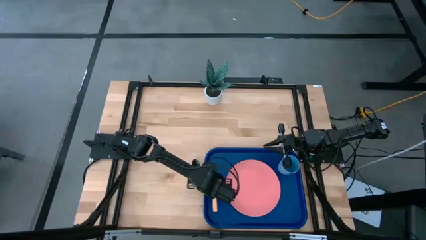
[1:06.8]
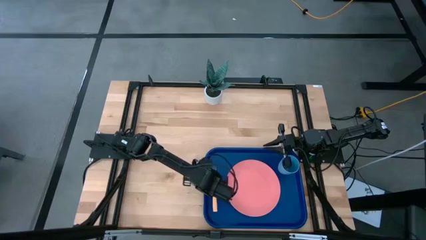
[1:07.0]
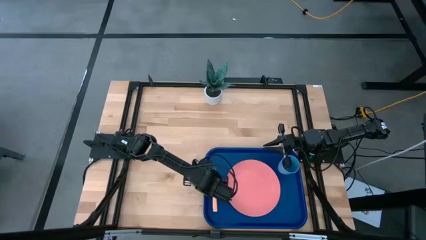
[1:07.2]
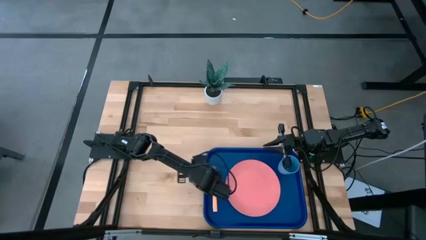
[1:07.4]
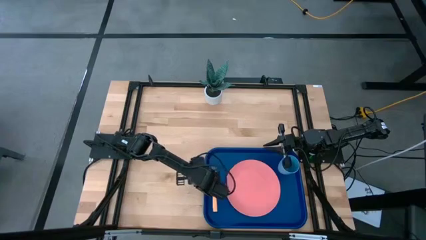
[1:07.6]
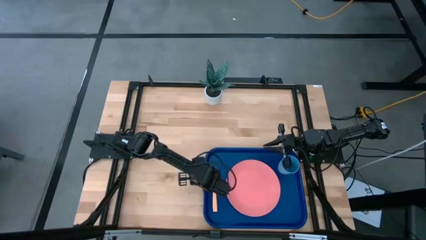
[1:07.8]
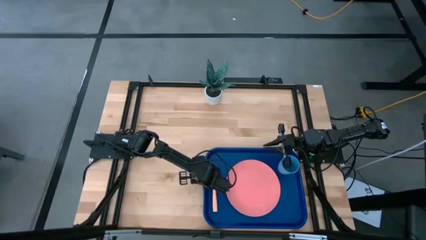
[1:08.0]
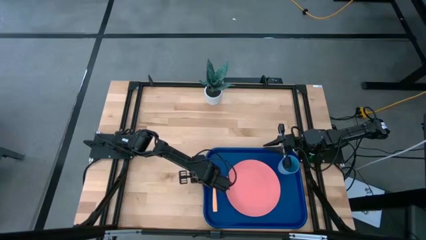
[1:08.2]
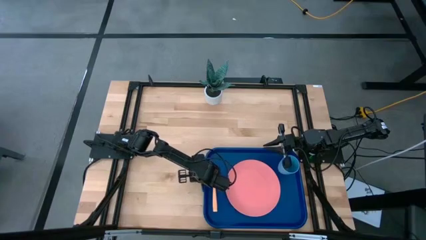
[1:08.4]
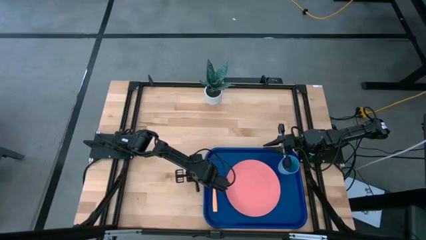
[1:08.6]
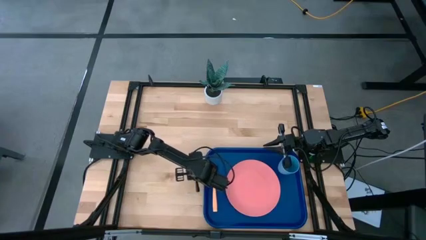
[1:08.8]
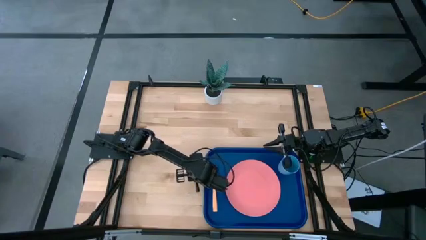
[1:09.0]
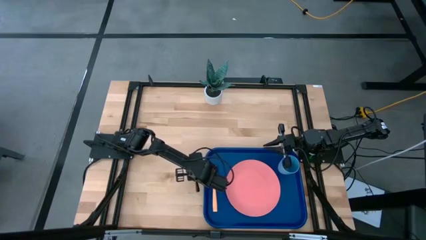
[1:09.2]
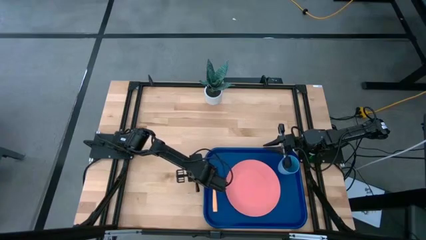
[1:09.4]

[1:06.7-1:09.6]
Task: Pick and place plate/cup/fork/spoon on tray
Put the spoon on the tray

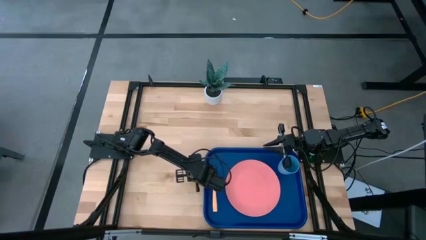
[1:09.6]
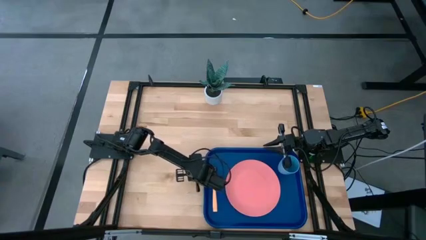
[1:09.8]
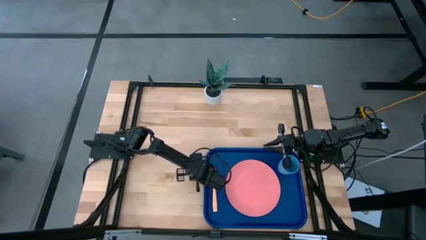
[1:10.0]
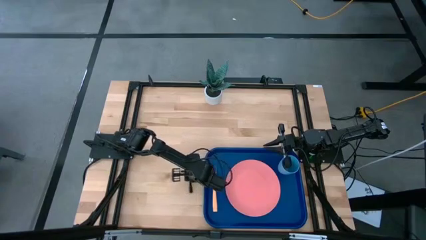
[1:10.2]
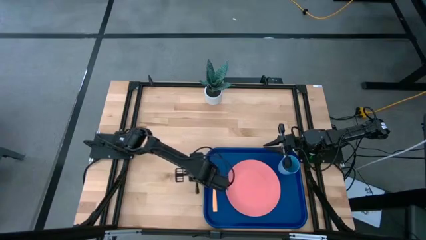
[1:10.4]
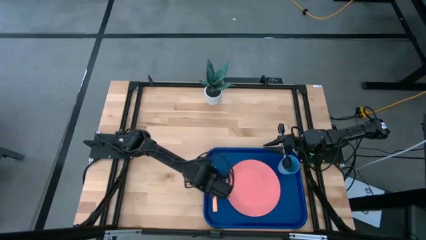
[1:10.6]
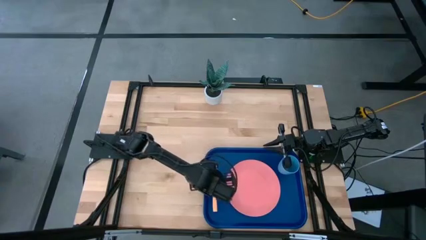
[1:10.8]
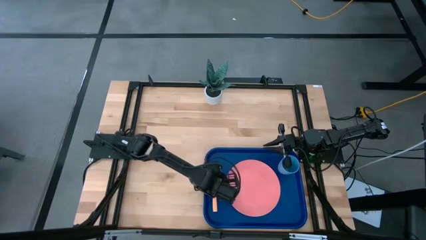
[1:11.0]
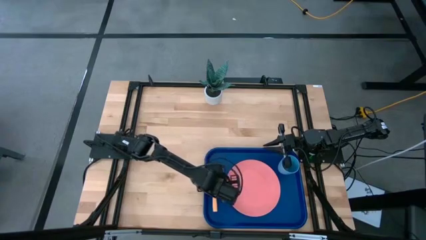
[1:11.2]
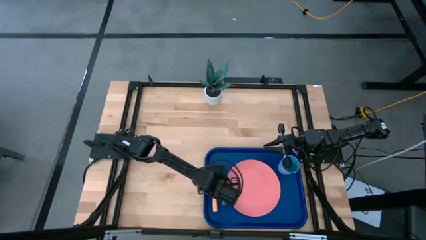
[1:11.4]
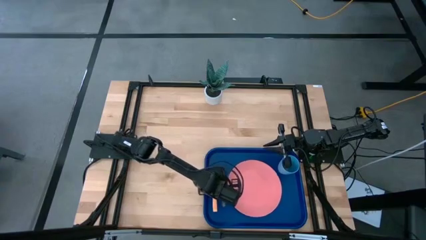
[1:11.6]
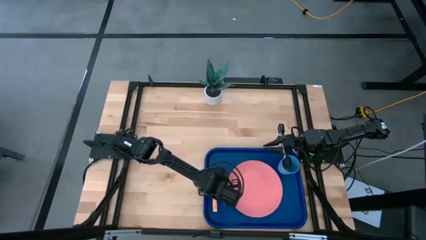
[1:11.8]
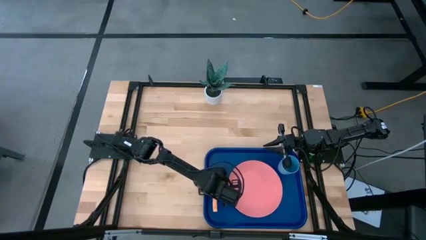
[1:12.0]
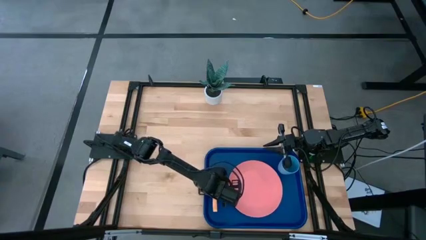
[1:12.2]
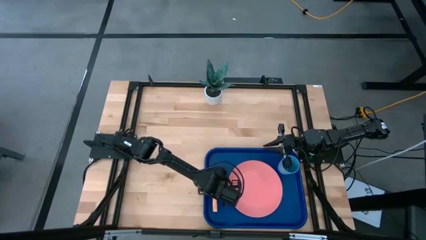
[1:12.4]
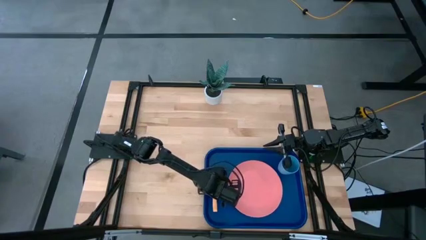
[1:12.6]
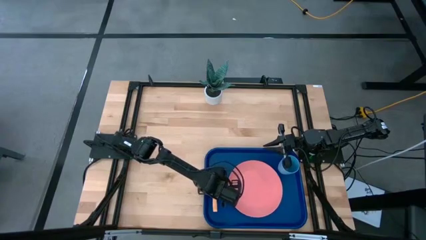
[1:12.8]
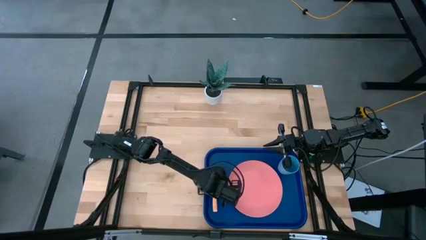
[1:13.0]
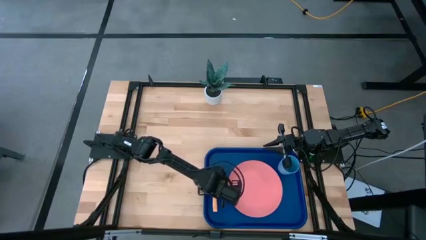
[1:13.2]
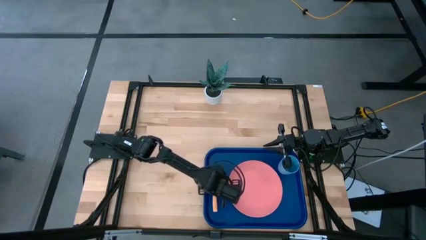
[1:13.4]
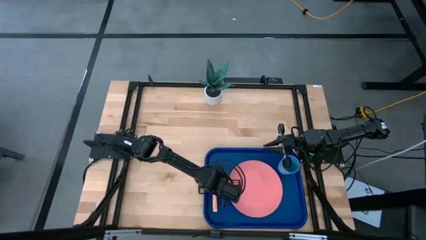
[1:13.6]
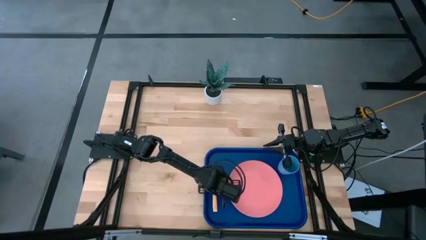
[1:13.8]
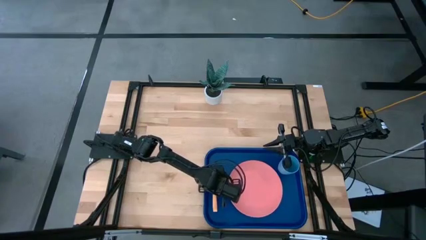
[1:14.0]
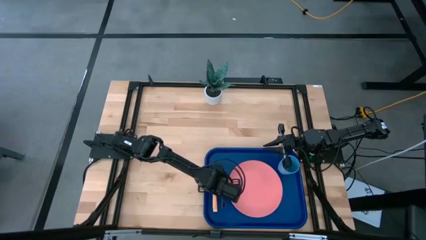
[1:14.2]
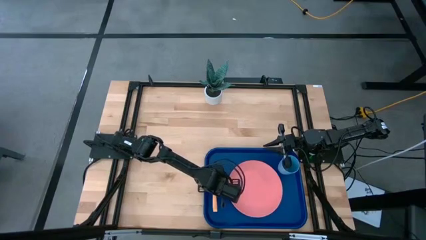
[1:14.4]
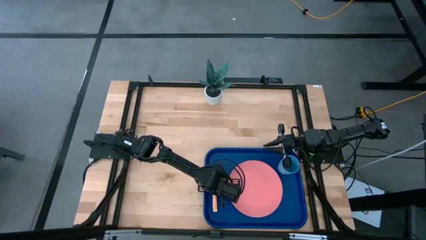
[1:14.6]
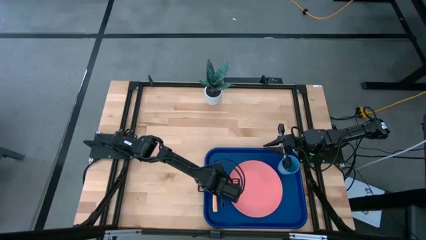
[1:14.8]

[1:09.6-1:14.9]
Put the spoon on the tray right in between the fork and the pink plate

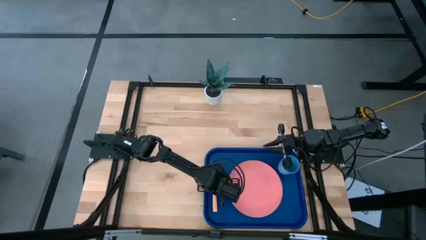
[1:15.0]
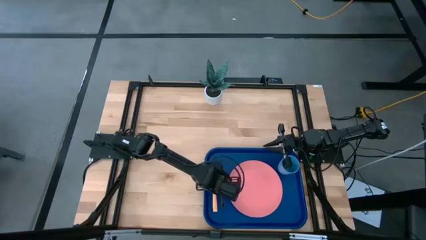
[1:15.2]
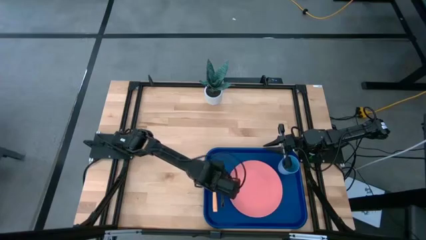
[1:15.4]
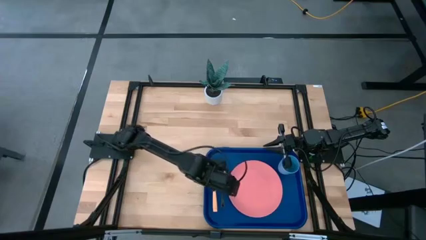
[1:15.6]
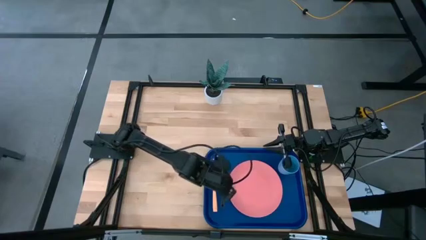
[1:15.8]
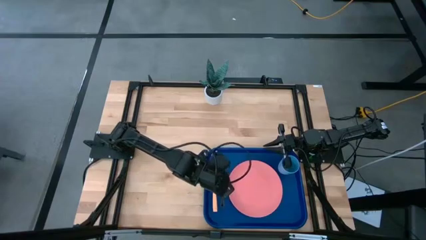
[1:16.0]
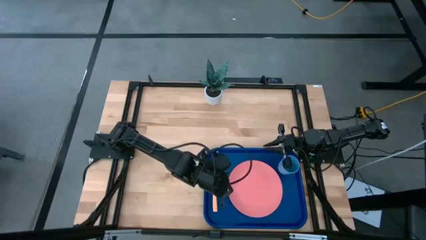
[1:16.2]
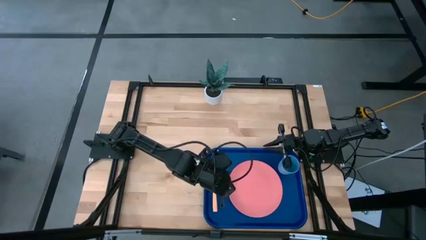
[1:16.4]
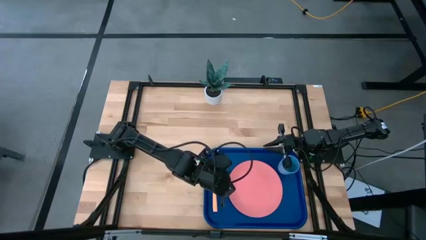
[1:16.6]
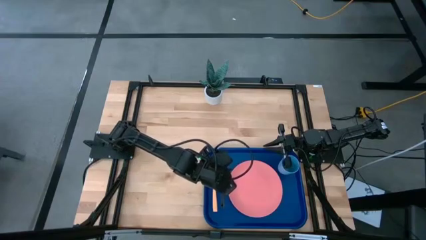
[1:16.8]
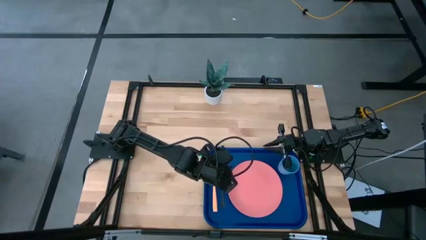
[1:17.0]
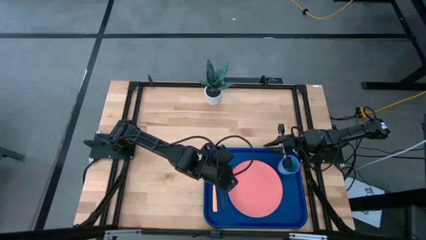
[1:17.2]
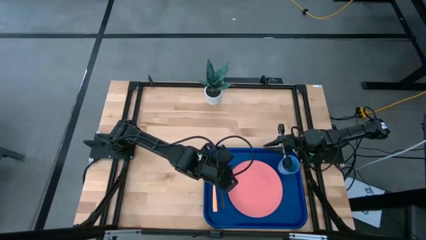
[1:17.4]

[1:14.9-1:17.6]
Return to Home Position

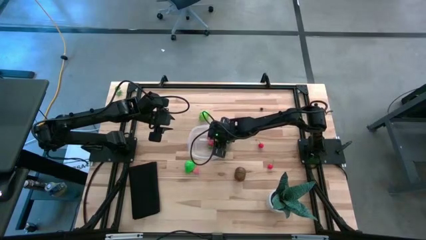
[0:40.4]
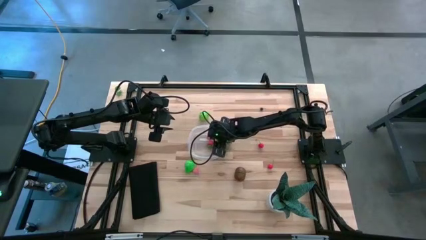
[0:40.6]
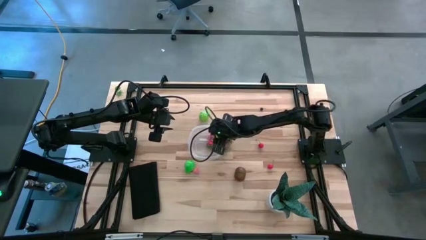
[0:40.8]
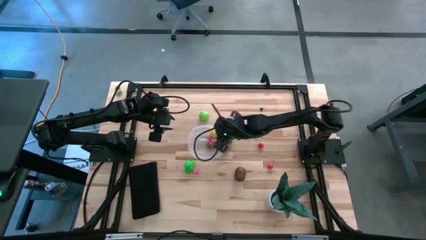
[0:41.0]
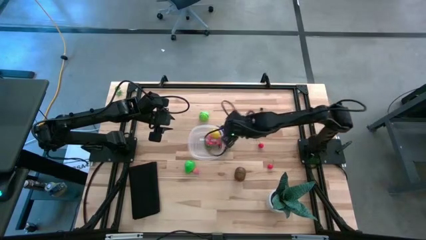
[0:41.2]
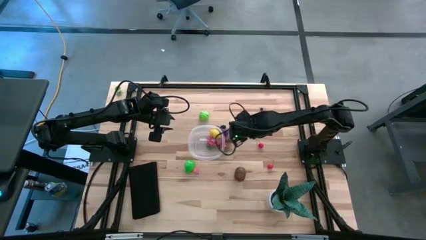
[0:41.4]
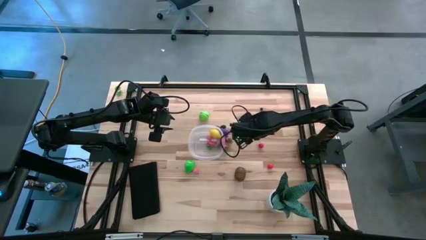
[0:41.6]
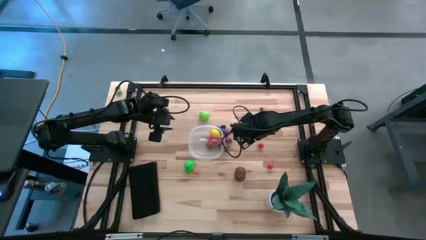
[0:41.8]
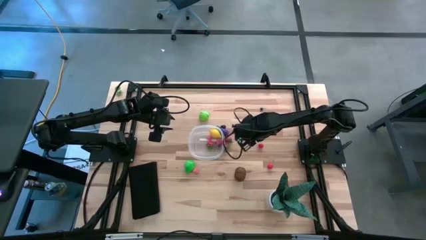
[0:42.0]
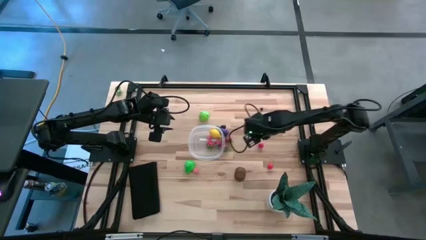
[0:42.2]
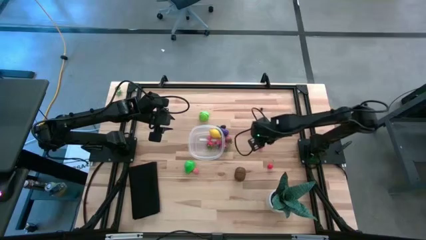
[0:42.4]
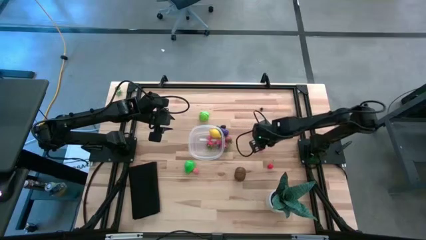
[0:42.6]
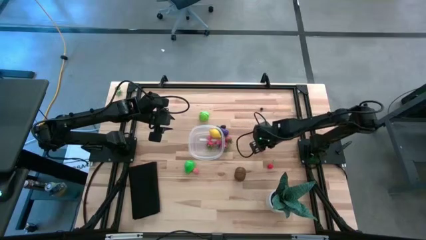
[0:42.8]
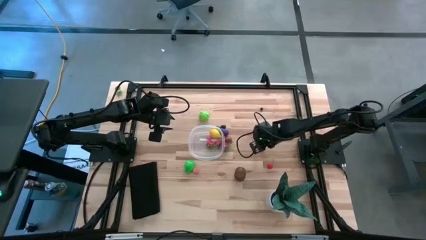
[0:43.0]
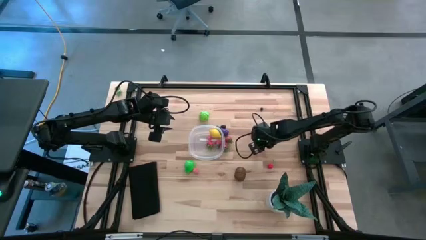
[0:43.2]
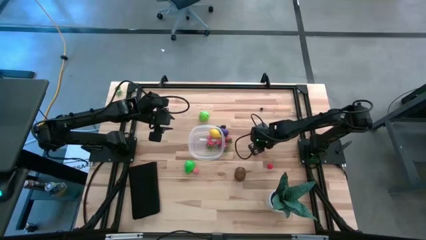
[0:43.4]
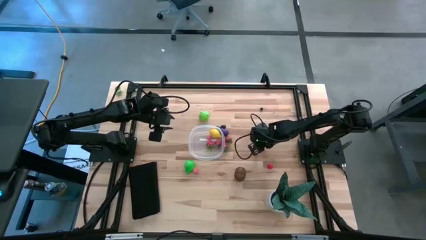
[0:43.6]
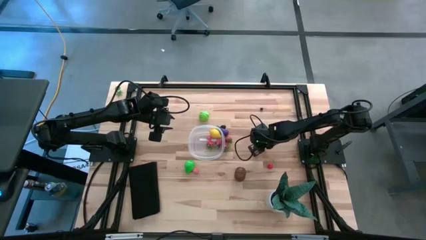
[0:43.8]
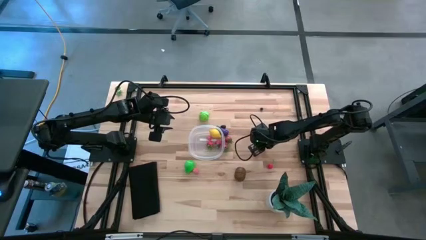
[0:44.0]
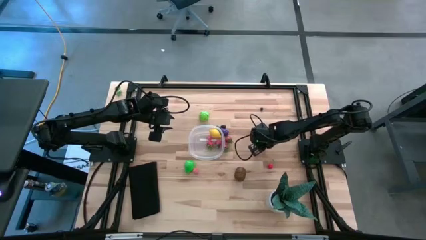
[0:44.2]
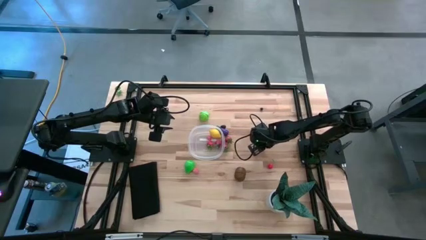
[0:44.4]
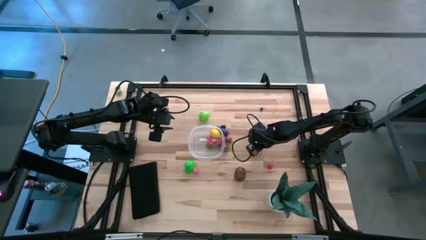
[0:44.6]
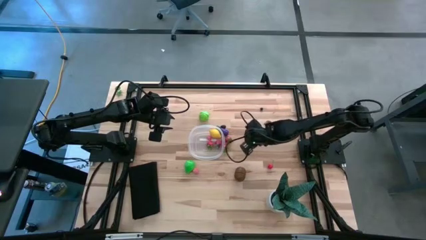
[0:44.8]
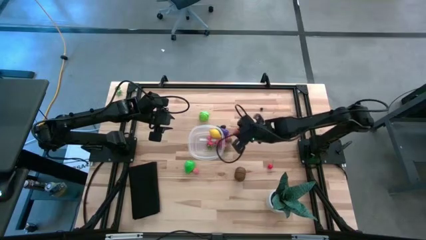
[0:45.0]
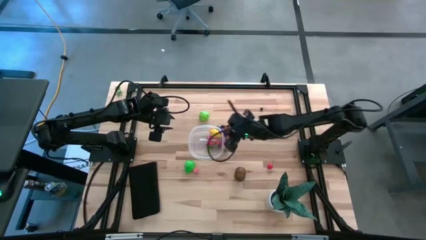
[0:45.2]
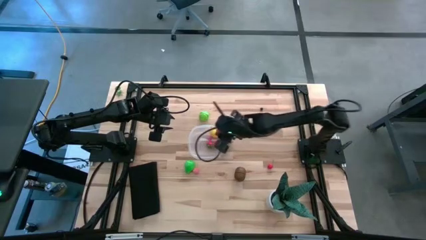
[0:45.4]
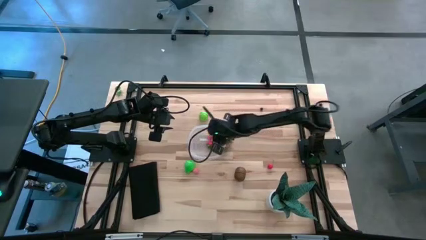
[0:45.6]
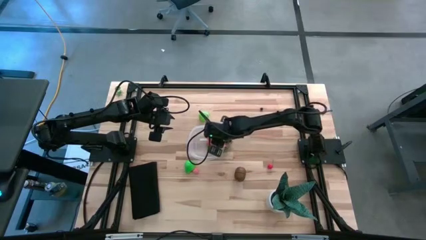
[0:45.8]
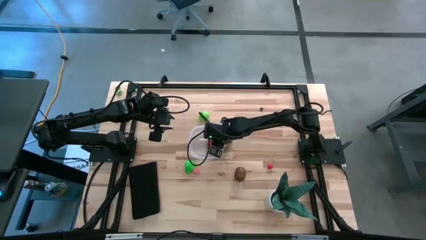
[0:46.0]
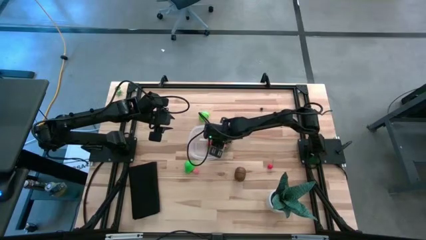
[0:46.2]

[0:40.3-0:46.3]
Task: Pick and placing Produce into tupperware
Put the top cherry into the transparent bin
